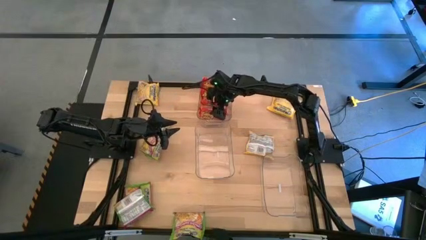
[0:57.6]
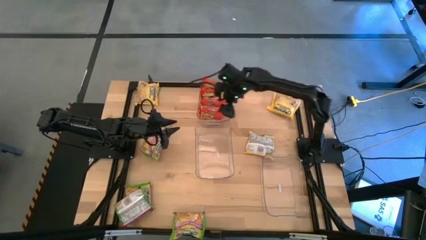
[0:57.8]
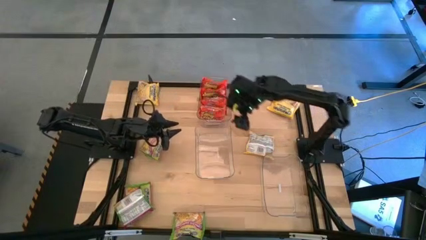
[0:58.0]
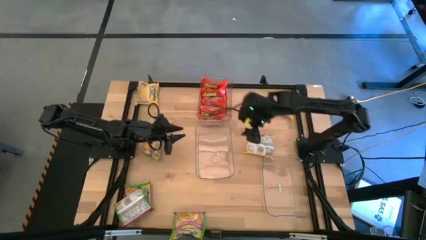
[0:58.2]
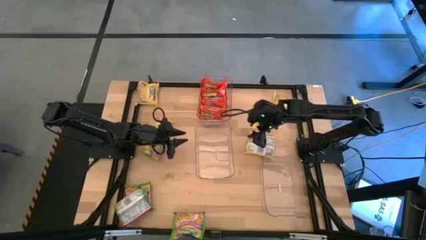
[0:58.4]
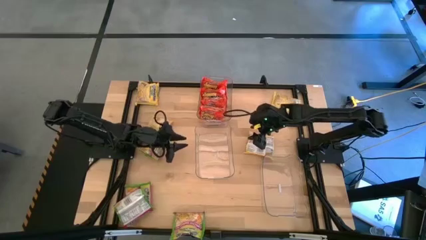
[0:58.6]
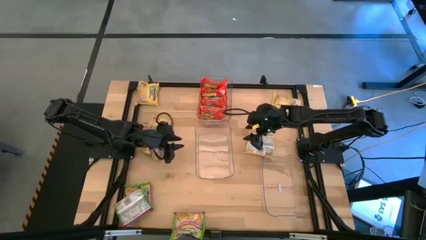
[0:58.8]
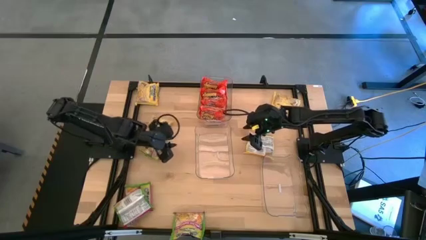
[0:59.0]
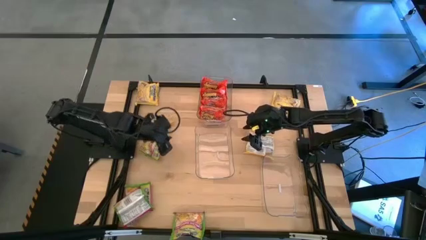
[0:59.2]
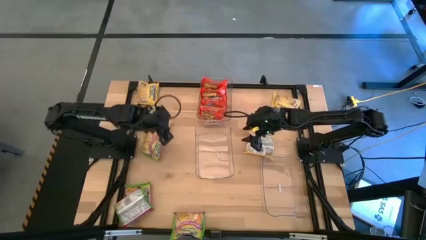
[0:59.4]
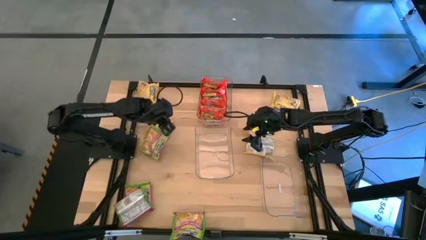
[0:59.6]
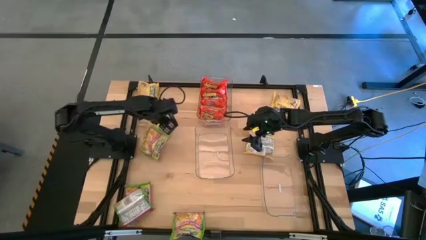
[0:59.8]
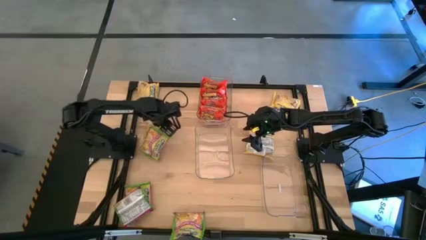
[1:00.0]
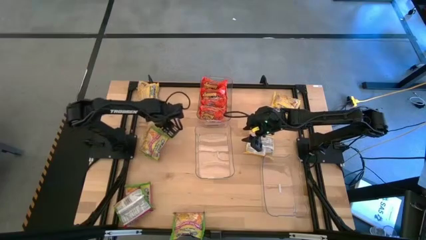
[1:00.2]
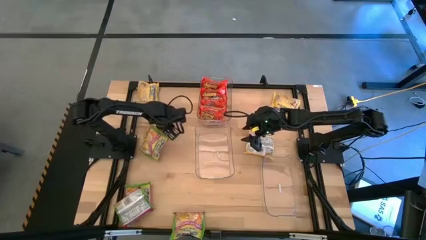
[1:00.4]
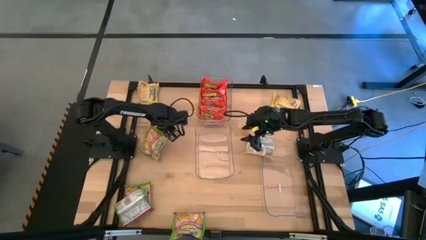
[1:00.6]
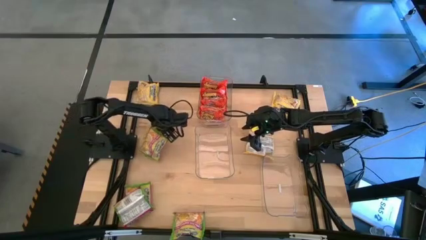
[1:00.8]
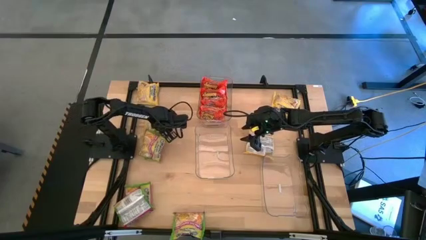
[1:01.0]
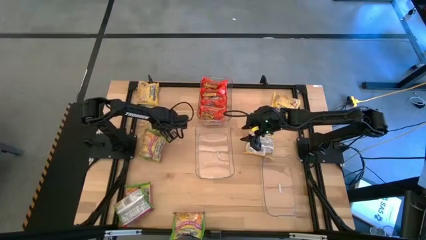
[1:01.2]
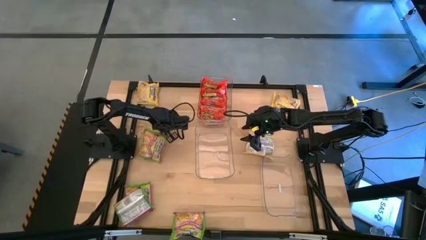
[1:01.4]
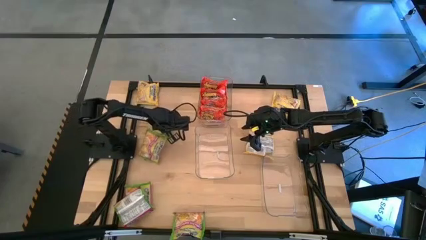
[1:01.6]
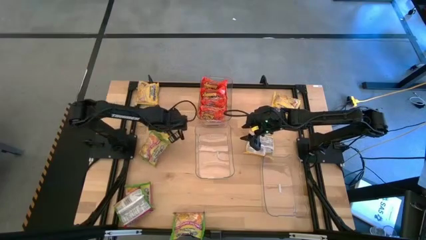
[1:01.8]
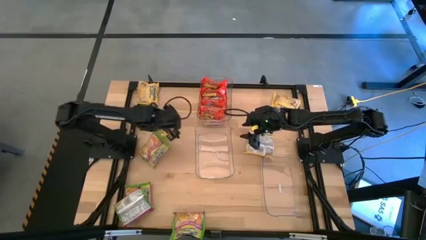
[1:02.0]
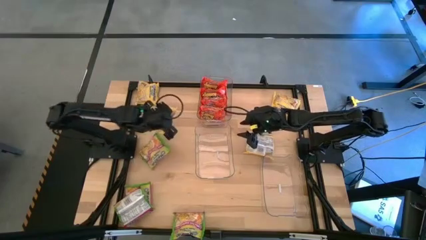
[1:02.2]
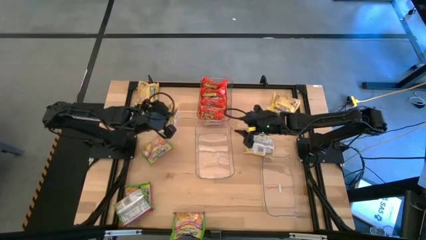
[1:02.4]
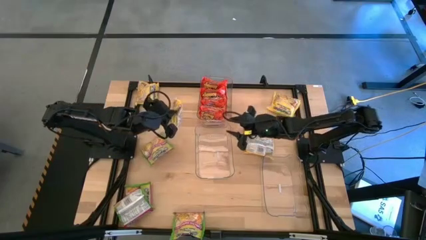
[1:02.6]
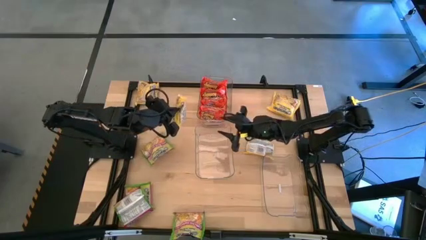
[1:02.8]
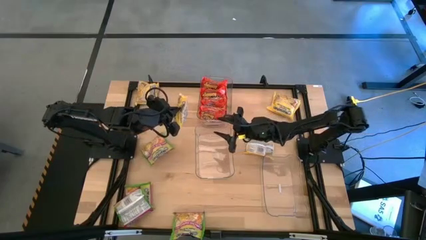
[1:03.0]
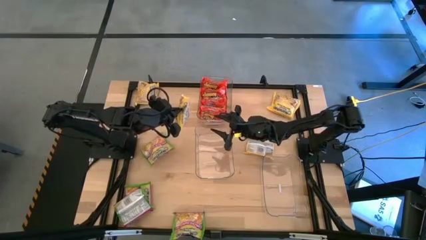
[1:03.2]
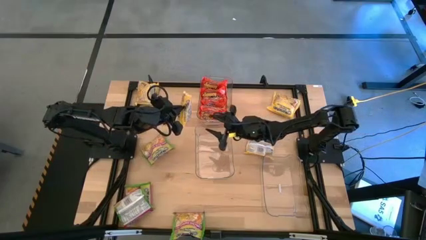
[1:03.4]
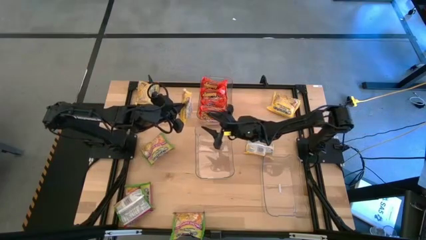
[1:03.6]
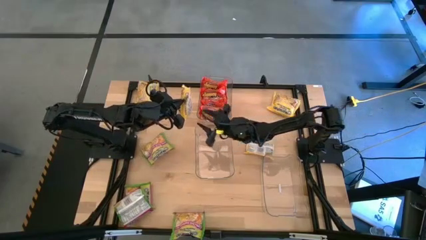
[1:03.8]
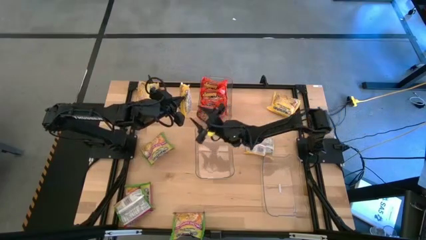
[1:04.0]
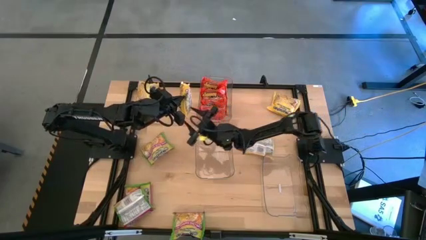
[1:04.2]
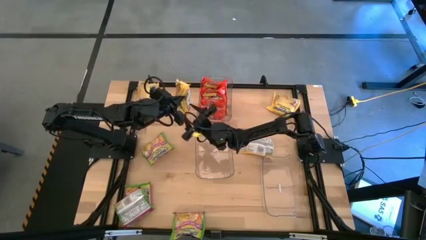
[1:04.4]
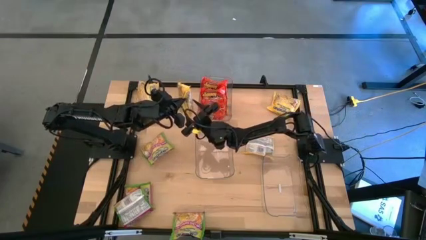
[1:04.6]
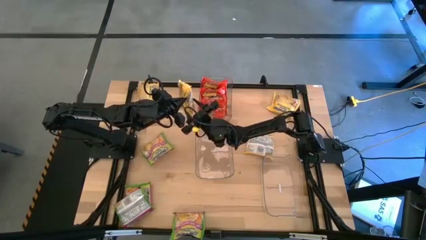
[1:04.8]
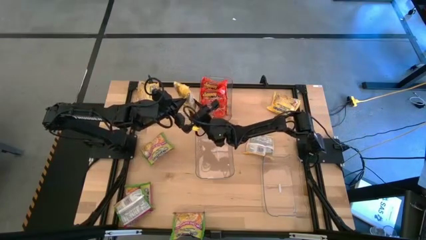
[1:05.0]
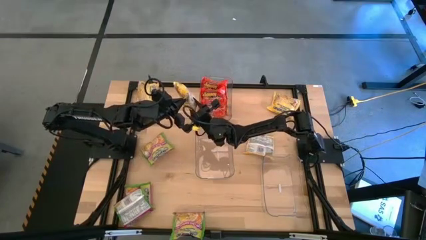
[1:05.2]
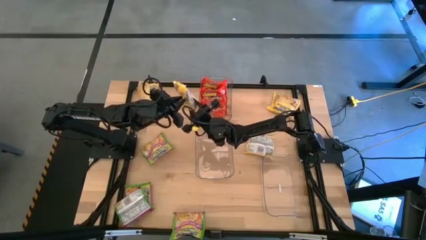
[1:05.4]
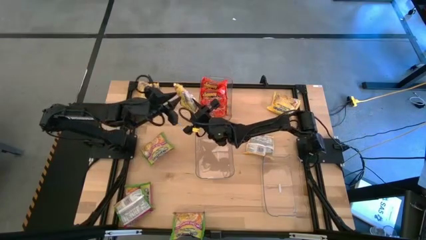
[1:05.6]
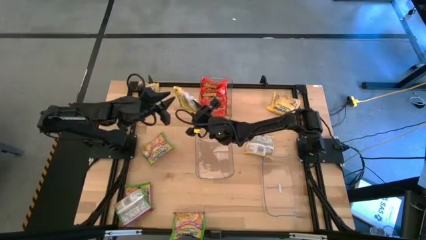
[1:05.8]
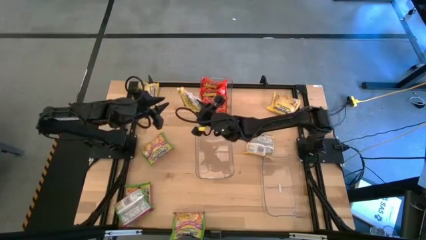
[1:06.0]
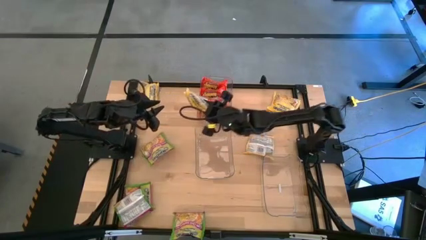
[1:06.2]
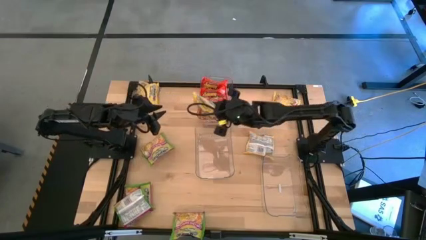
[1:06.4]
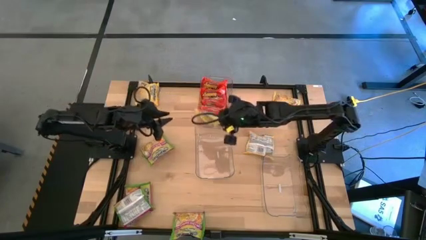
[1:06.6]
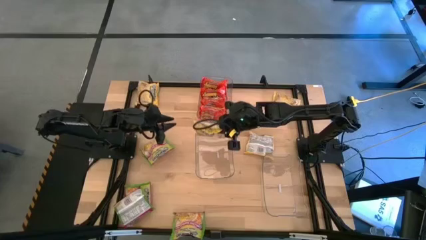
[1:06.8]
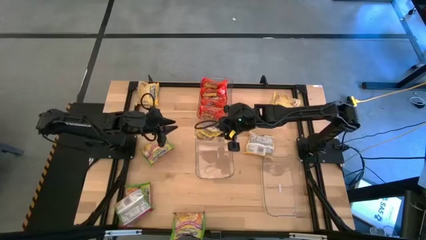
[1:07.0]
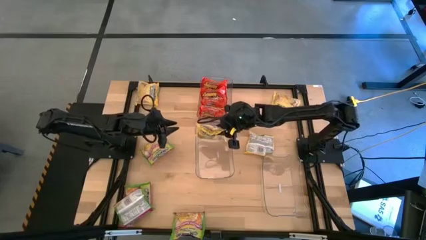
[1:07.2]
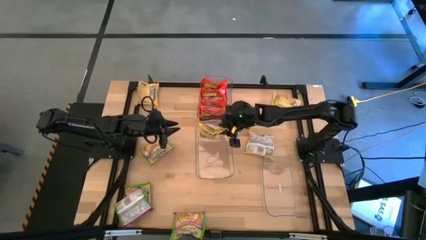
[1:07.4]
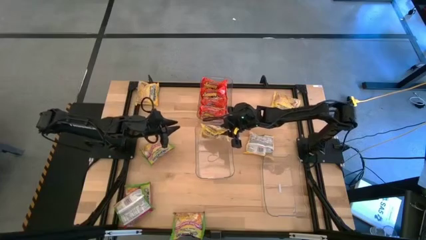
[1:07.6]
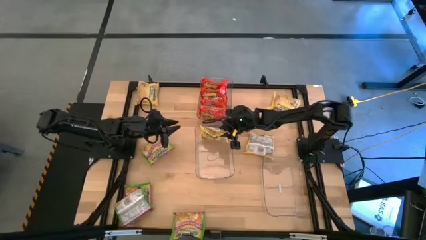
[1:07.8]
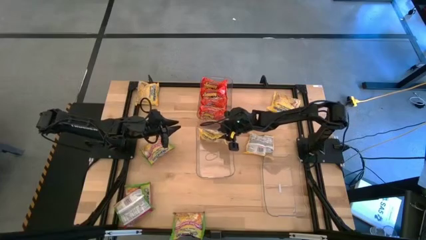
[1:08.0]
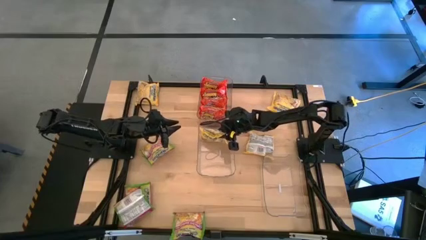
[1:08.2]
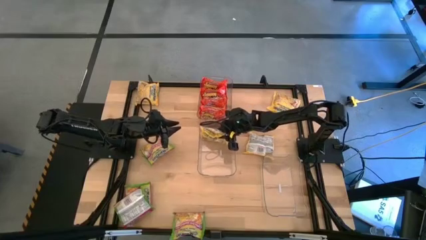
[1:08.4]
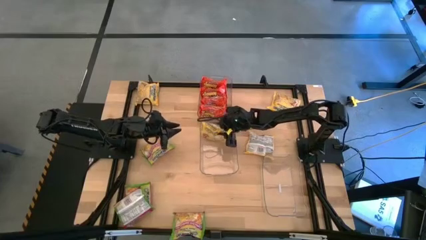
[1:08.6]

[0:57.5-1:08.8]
Task: Sort Maruchan noodles
Put the yellow noodle pack into the middle transparent bin

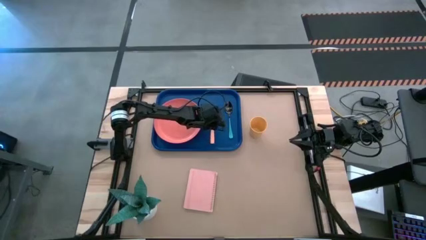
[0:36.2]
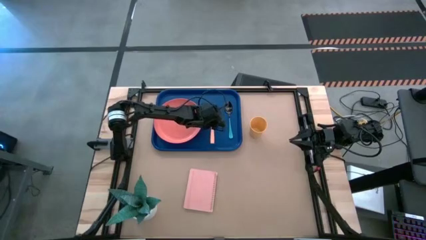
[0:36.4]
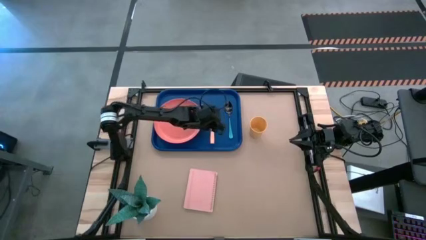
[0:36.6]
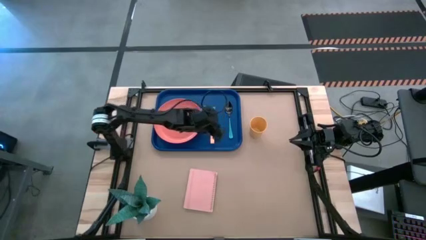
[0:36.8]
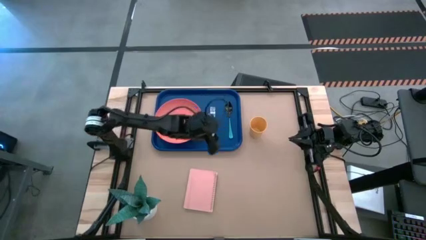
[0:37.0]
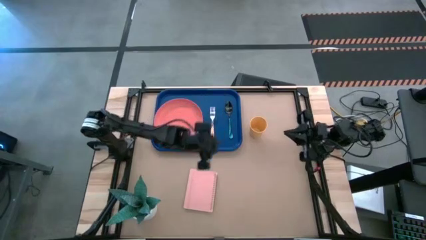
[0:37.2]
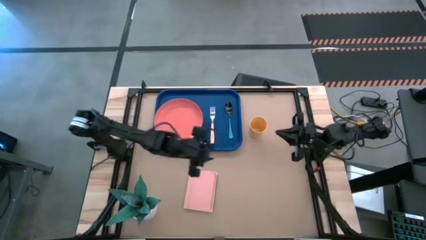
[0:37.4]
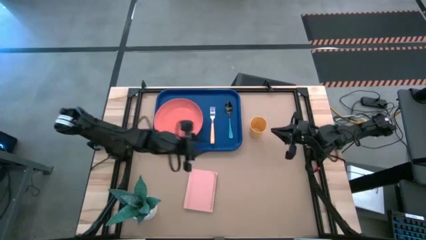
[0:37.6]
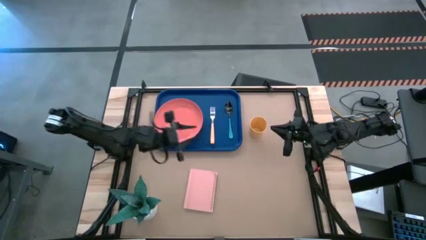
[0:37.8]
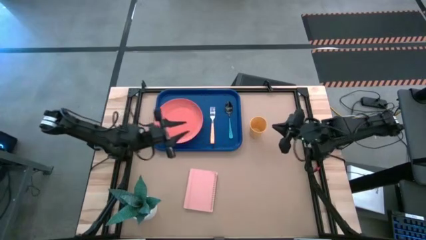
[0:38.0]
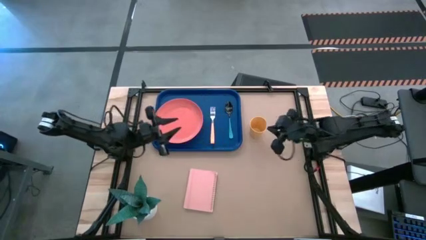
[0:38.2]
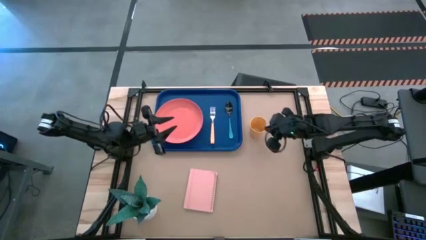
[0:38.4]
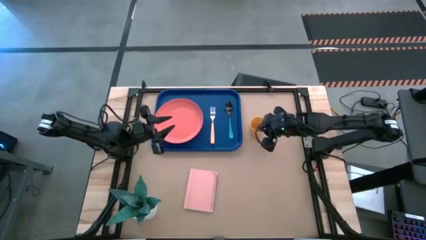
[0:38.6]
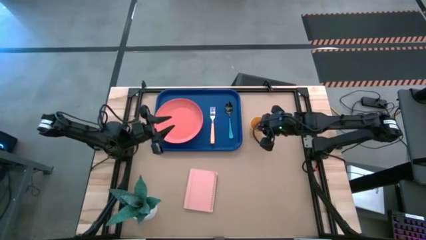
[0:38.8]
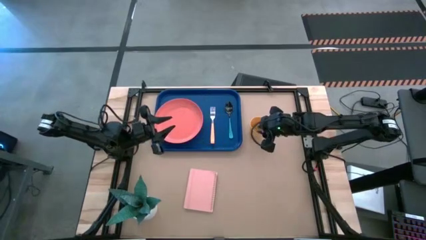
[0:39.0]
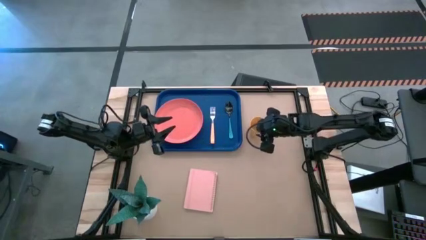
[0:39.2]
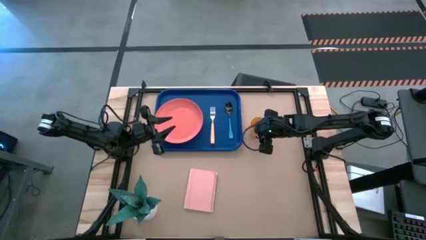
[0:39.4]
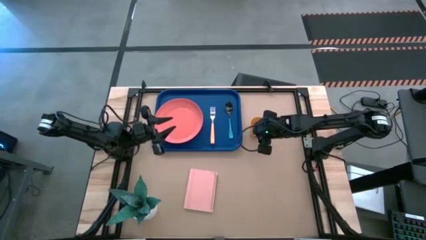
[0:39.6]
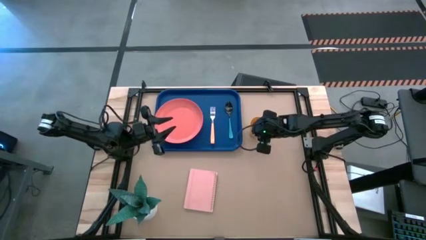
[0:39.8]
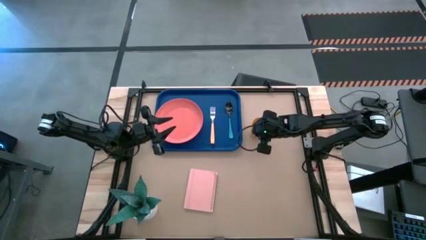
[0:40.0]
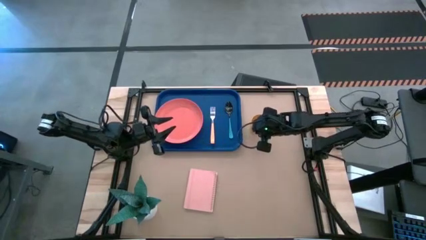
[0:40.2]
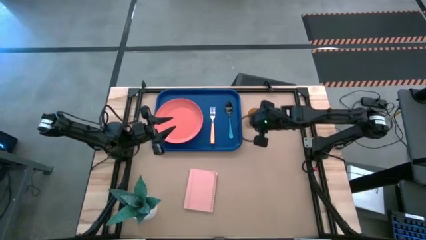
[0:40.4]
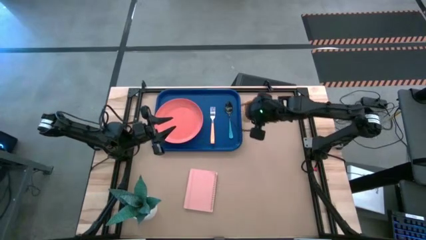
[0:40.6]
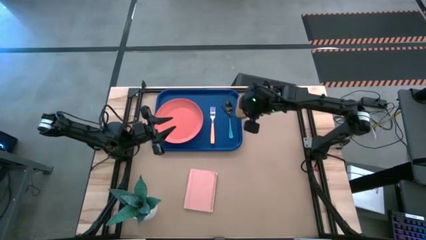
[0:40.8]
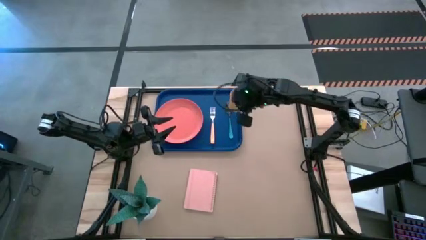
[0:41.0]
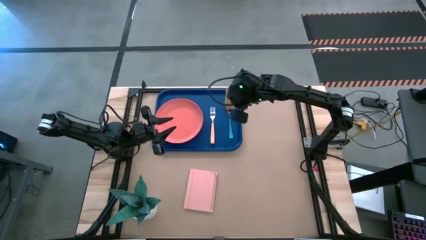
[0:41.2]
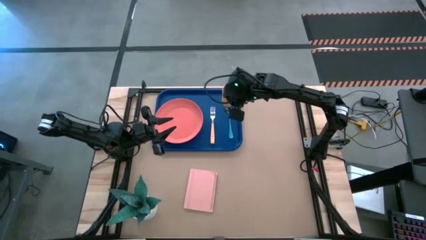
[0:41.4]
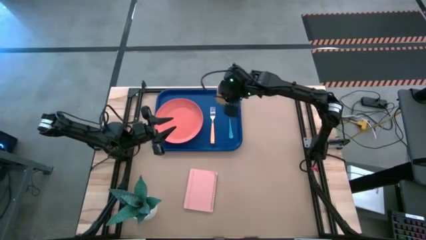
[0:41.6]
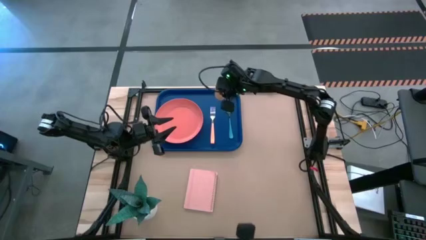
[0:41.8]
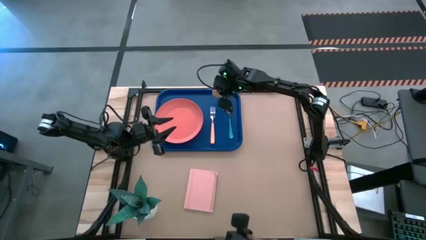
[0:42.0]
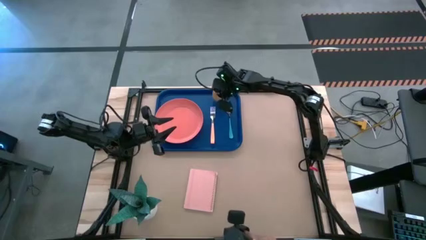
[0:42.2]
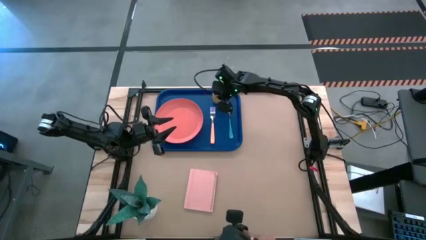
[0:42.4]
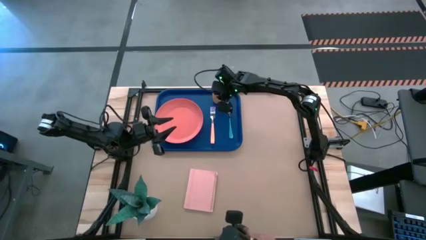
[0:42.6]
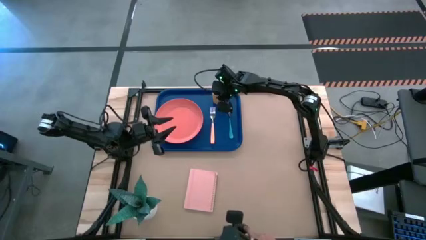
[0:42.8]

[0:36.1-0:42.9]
Task: Pick and place plate/cup/fork/spoon on tray
Put the yellow cup to the top of the light orange fork and light blue spoon on the blue tray
